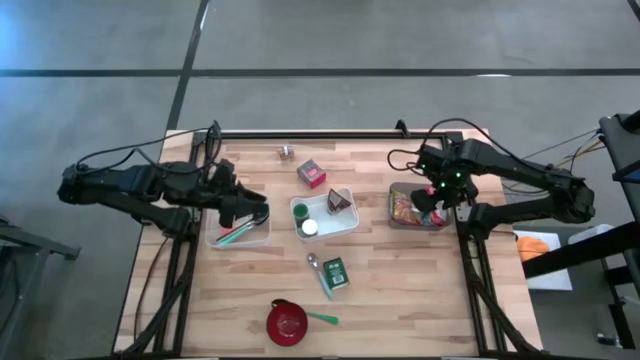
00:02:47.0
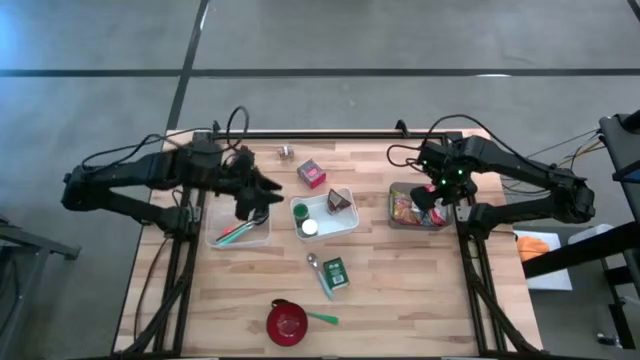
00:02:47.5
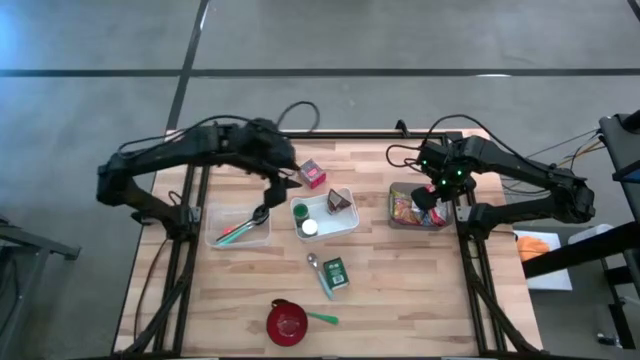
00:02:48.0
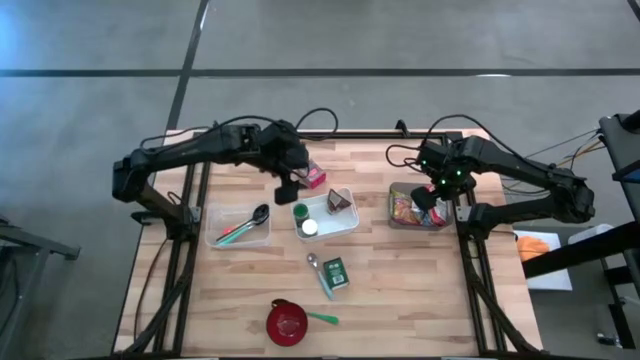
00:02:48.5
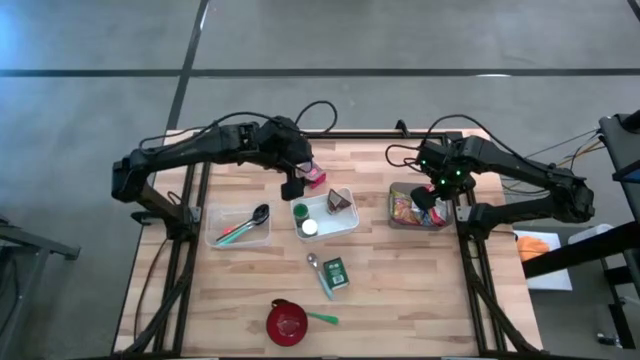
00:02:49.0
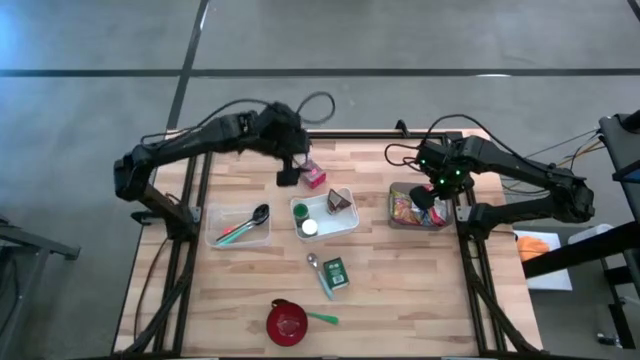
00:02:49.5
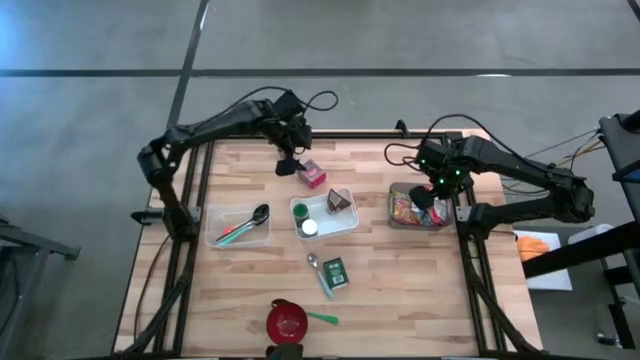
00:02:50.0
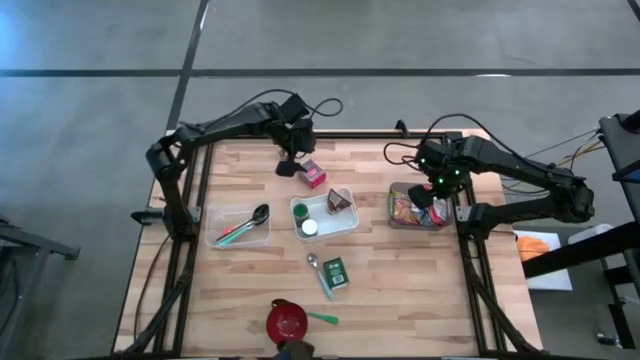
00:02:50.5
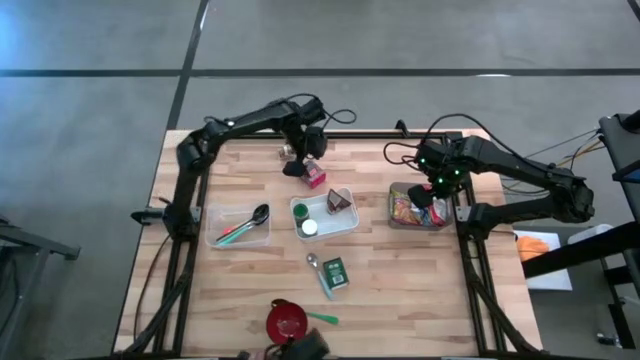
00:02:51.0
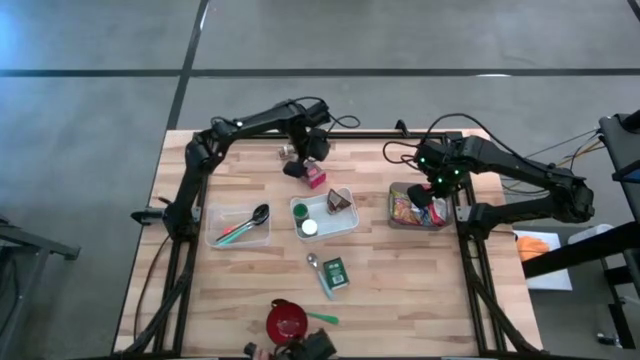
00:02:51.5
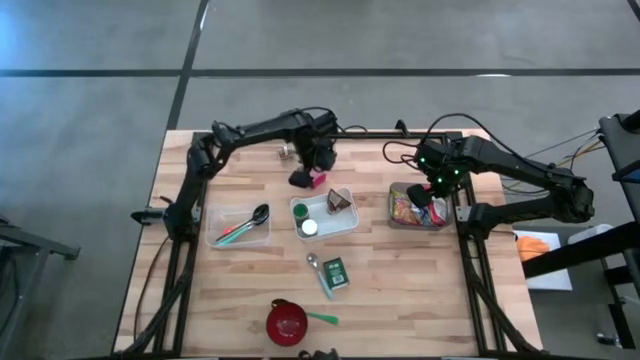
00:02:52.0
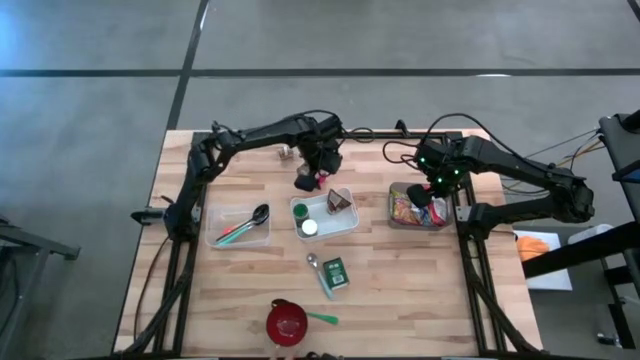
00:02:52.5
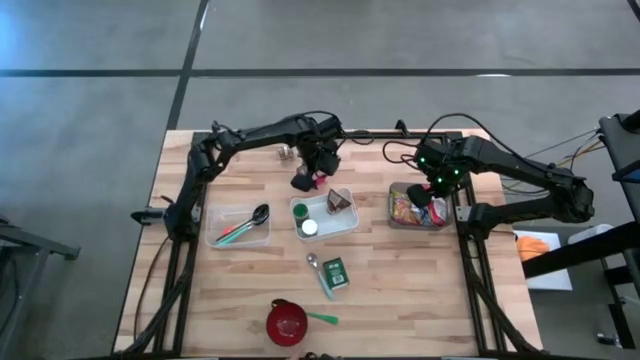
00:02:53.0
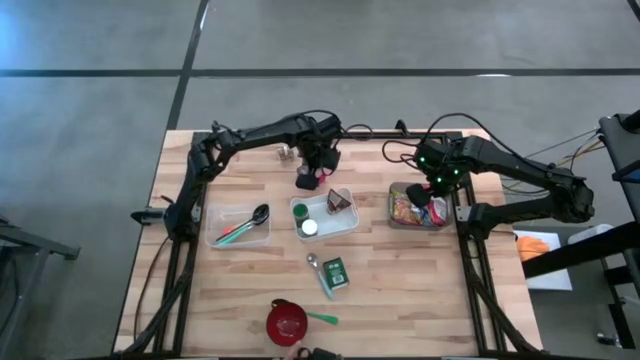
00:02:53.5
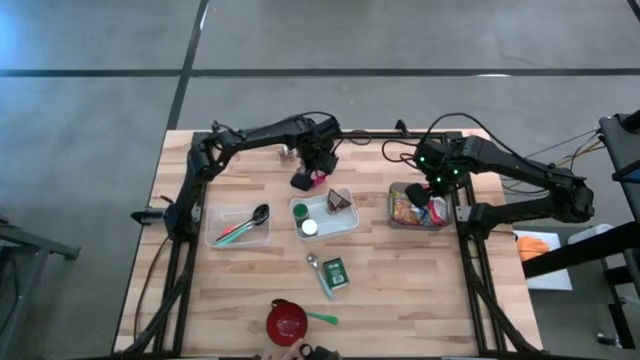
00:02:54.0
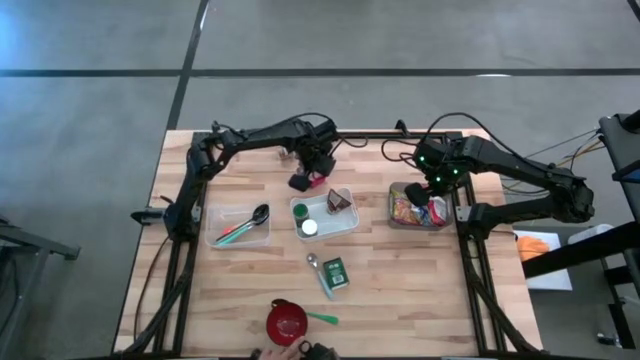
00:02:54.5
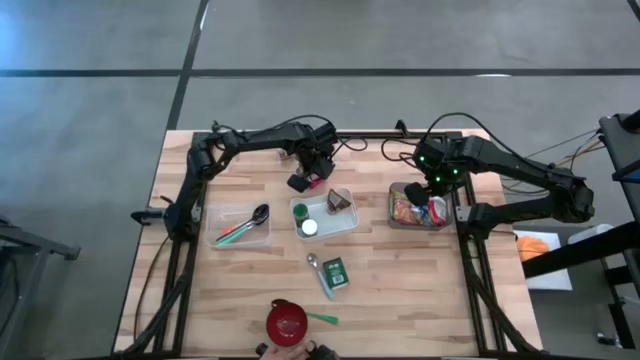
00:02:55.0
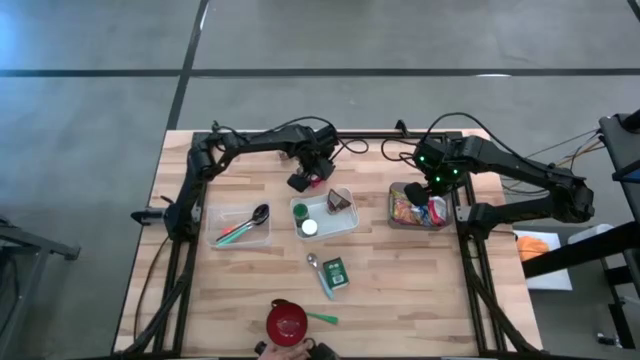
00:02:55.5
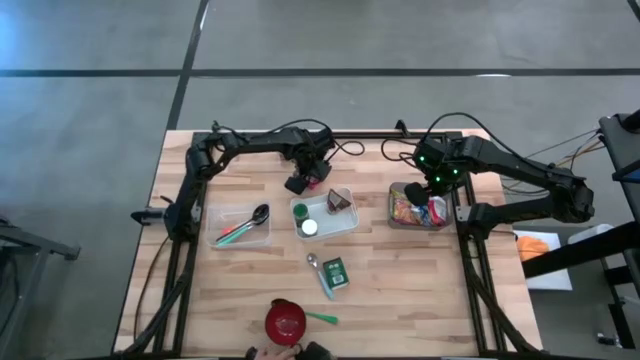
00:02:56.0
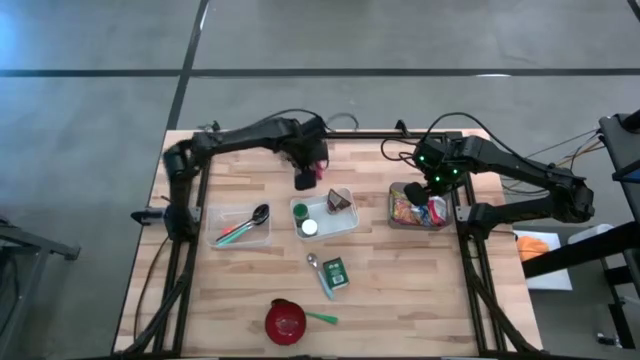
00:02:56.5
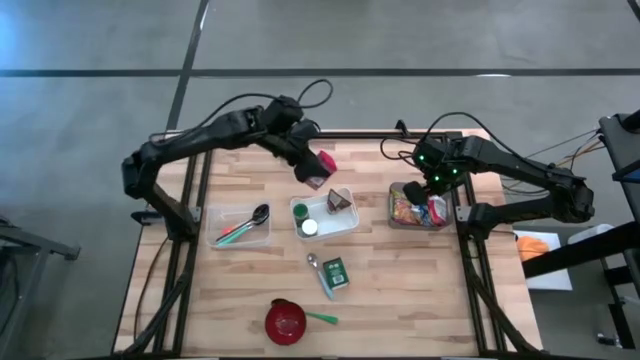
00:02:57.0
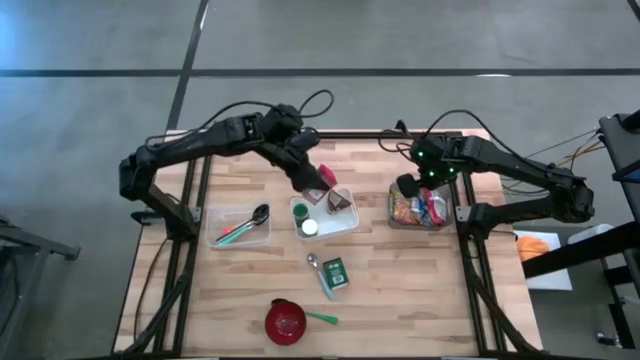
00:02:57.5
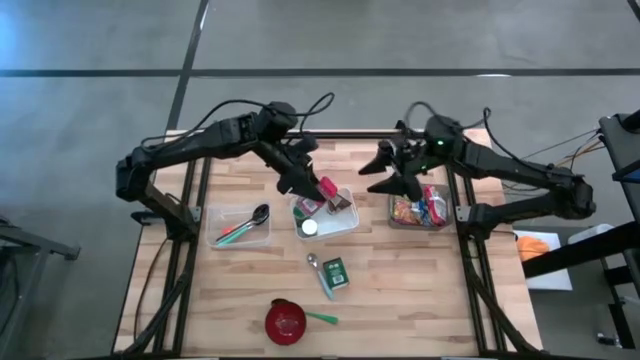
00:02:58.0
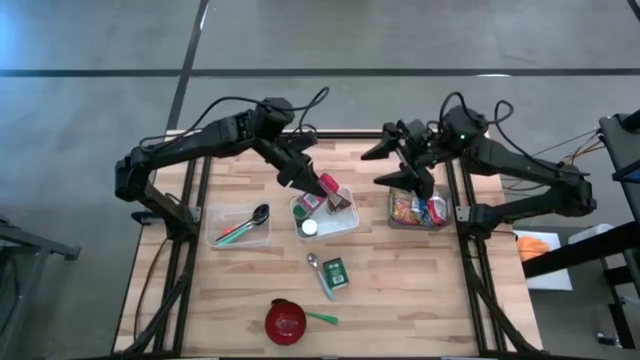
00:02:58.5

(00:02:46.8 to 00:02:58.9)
Put the red seasoning can into the white bin

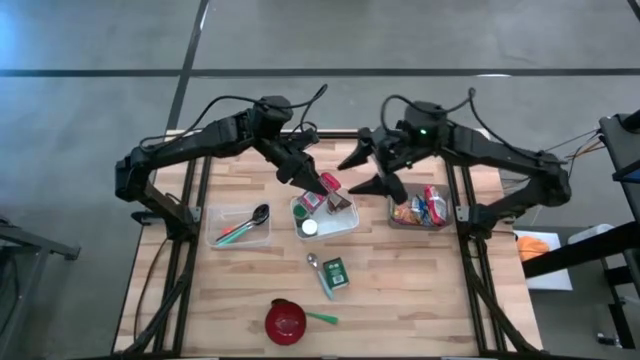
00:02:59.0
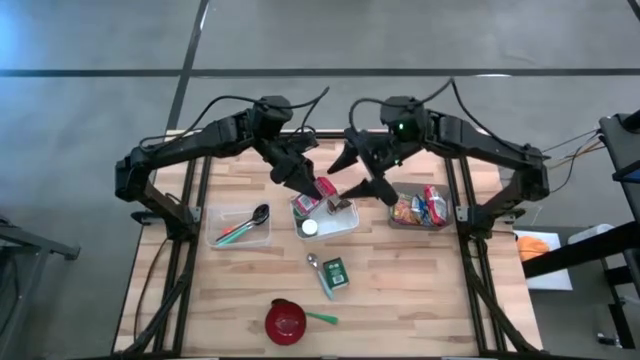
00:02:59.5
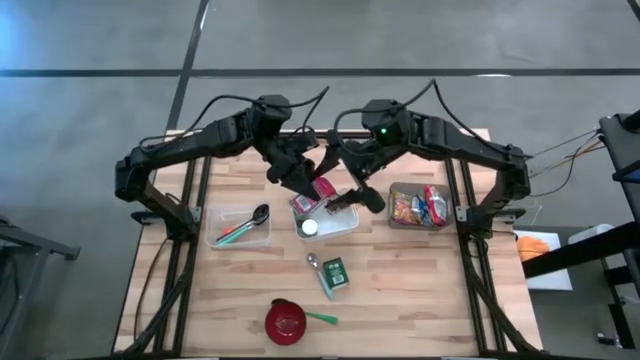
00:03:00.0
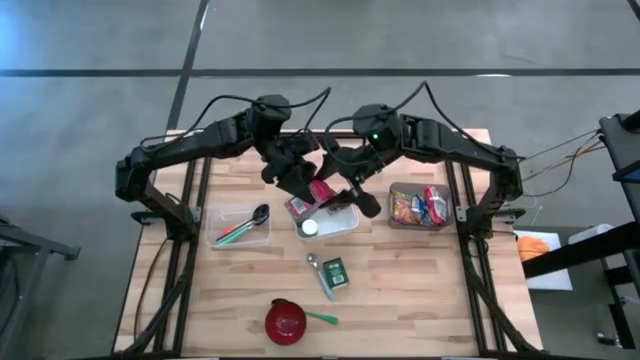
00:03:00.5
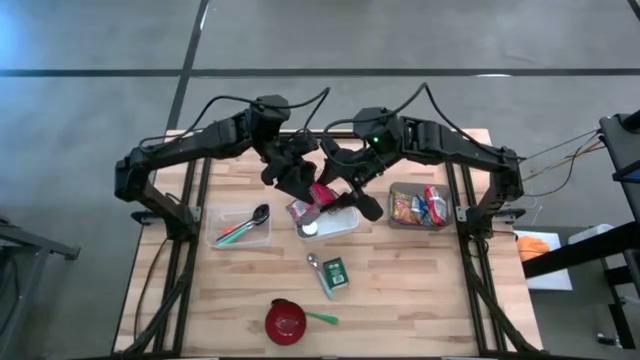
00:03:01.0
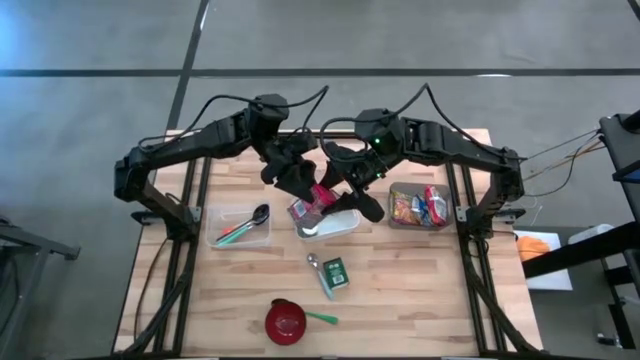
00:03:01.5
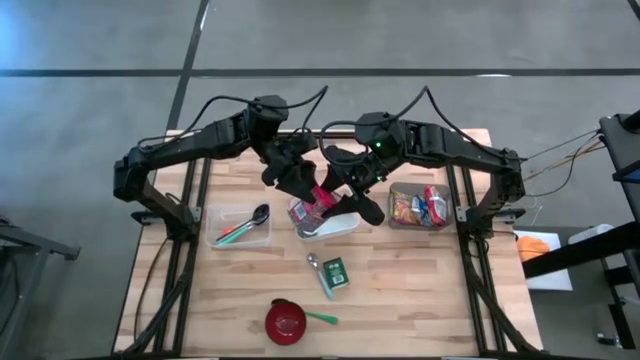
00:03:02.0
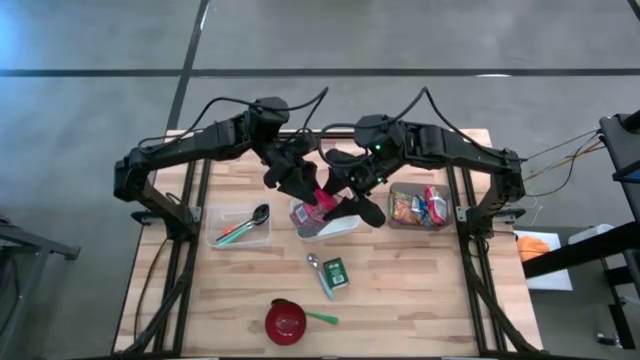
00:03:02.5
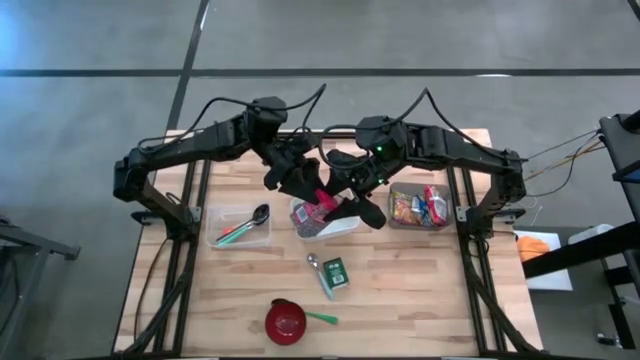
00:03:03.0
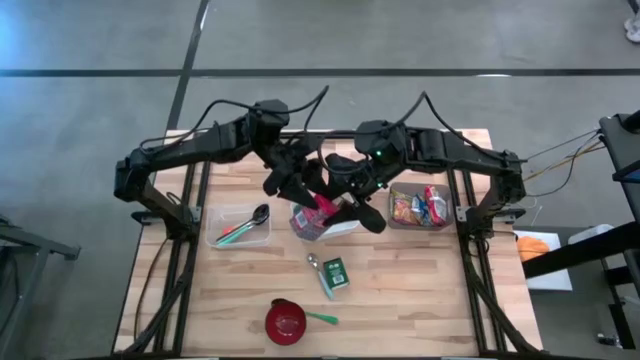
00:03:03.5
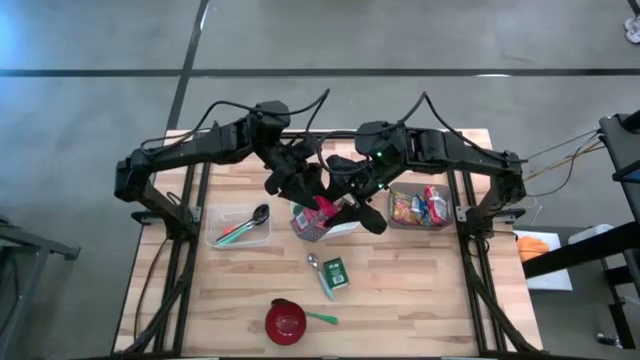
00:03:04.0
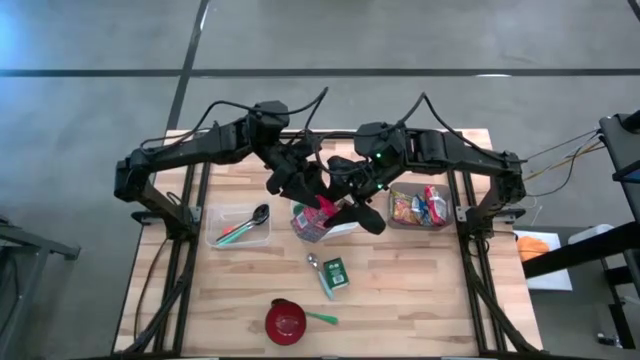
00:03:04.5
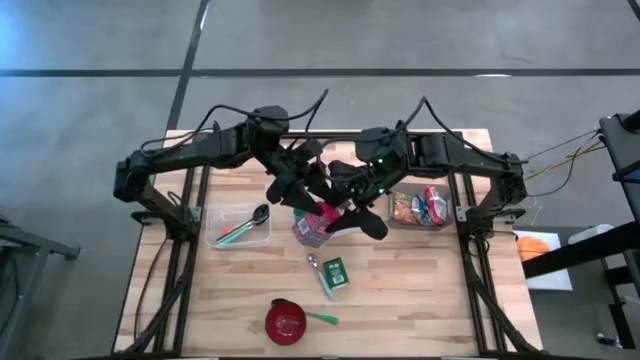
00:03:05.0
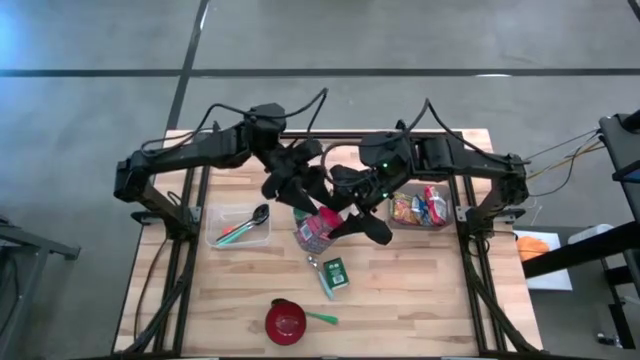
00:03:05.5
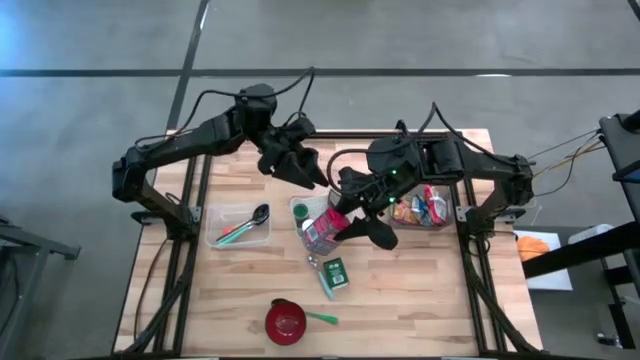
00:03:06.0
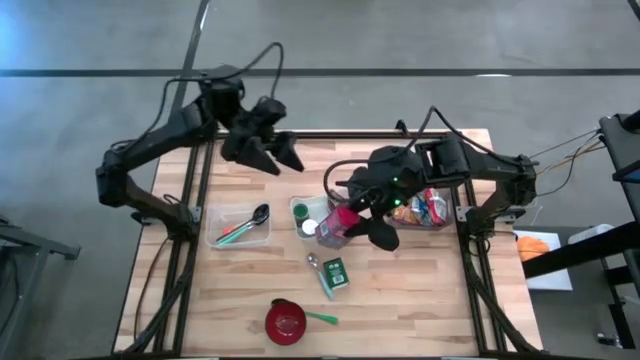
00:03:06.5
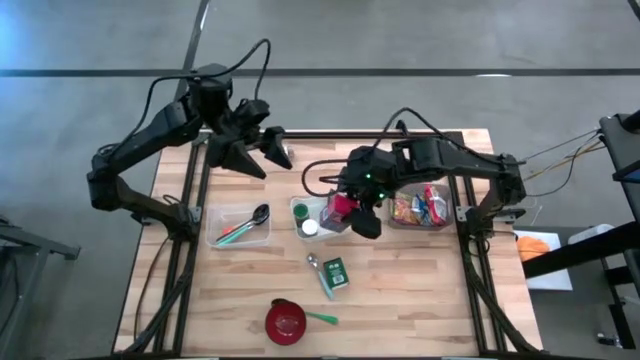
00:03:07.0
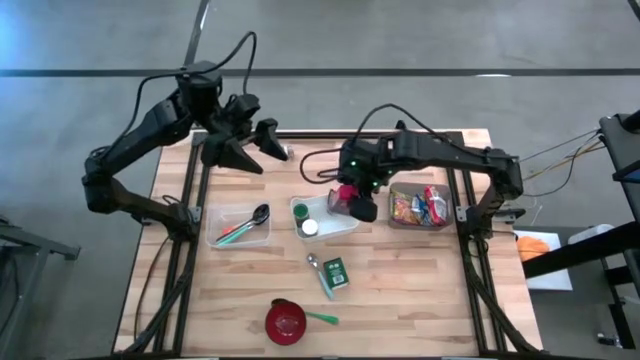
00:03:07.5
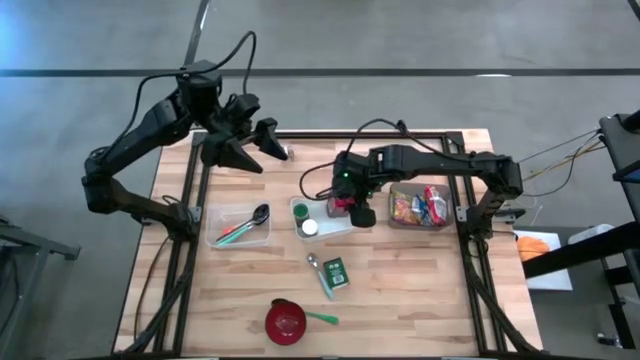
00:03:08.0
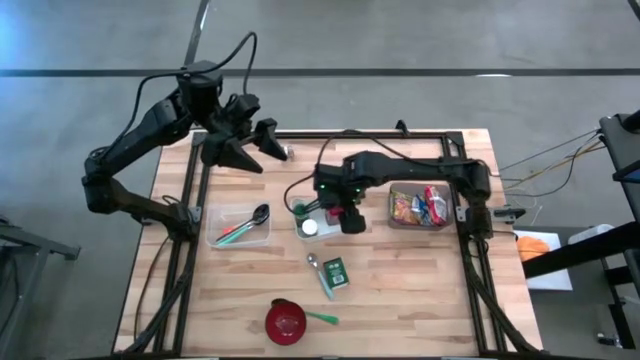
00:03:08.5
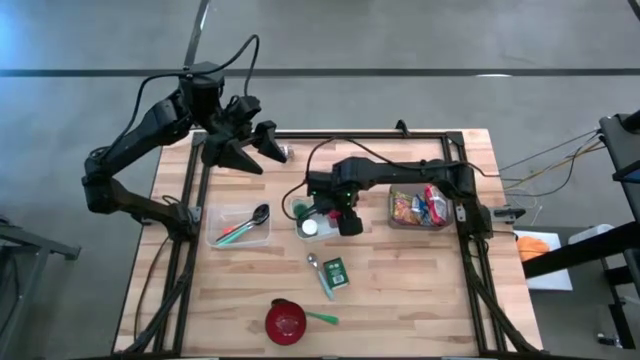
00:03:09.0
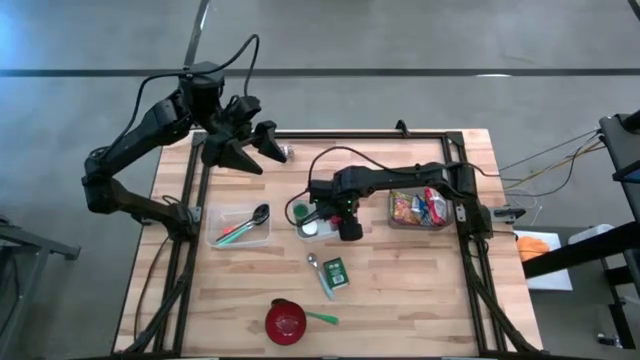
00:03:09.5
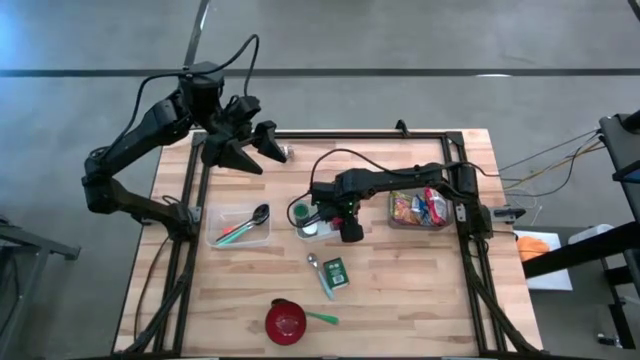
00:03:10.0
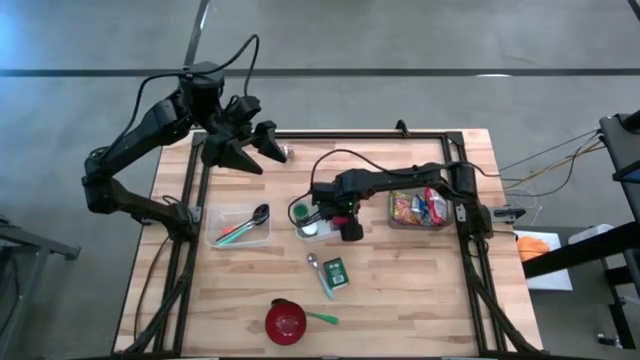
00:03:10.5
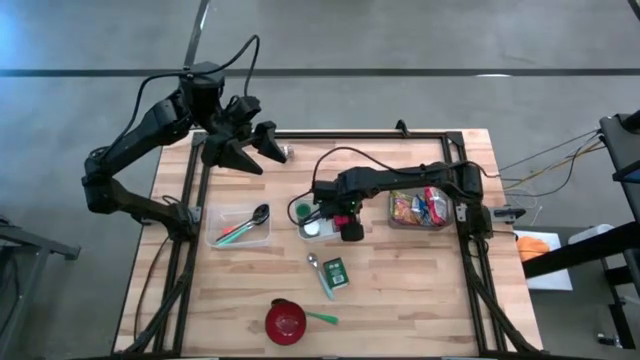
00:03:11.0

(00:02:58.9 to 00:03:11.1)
Put the red seasoning can into the white bin
